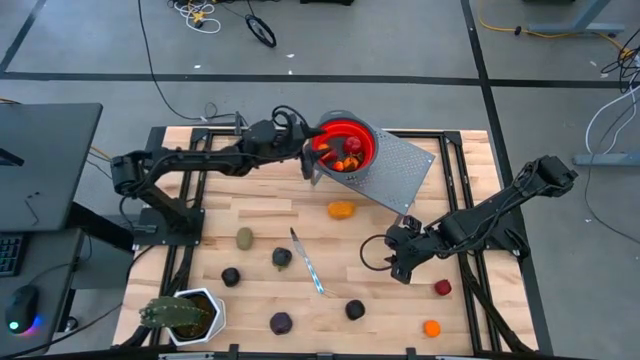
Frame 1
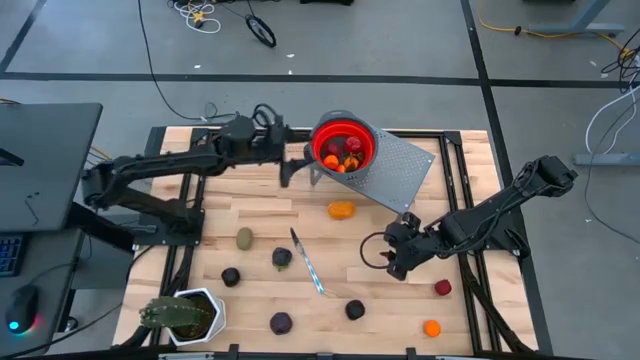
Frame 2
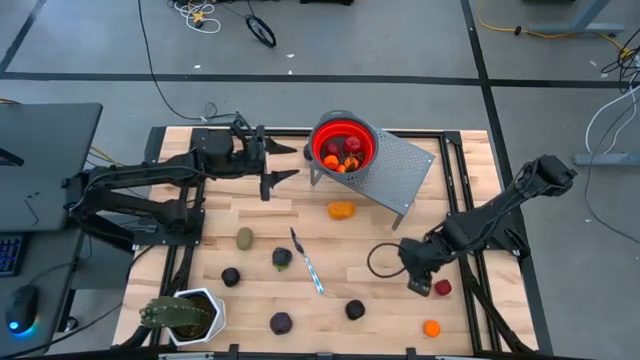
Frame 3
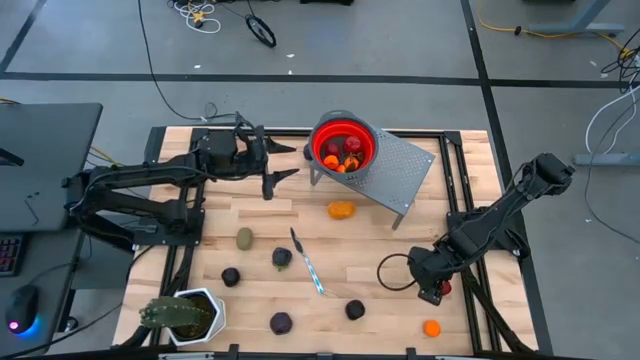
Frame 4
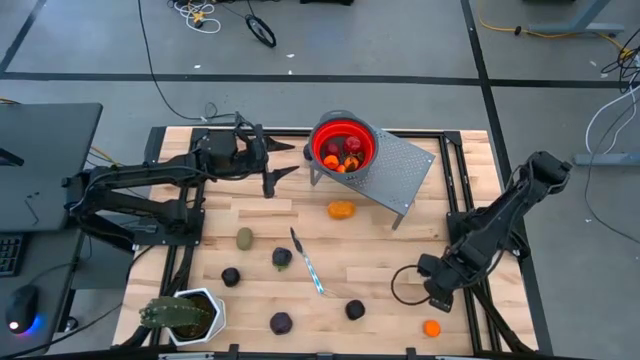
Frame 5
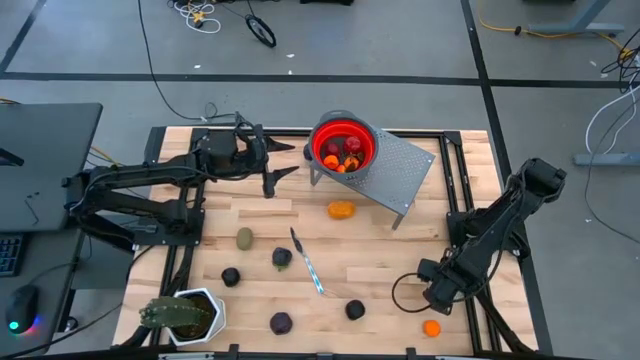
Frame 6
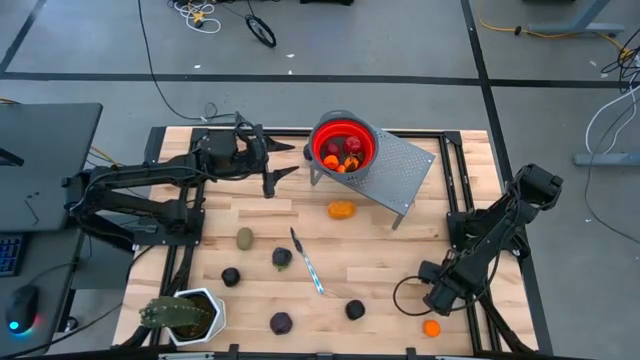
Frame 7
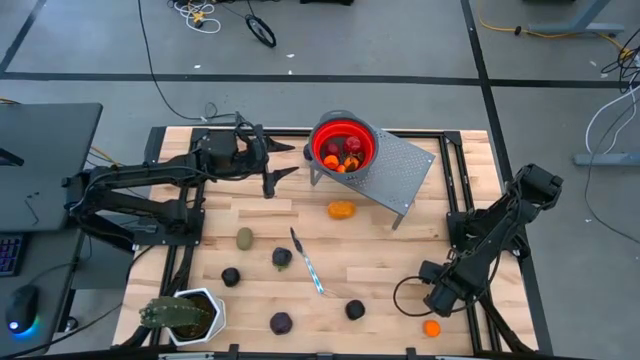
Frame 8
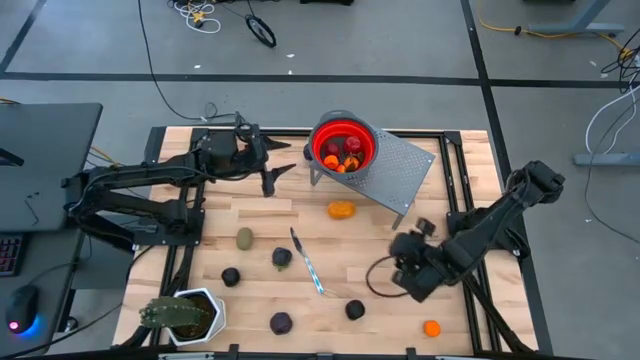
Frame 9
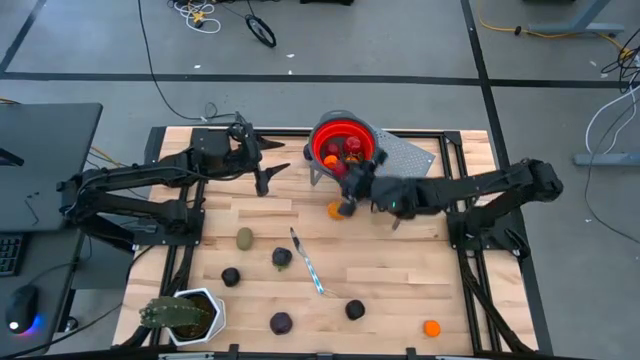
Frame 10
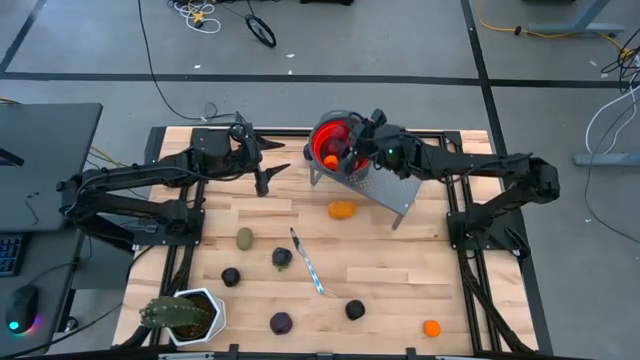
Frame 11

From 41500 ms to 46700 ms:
Task: Pick & Place Fruit
Put the pomegranate into the red strainer bowl

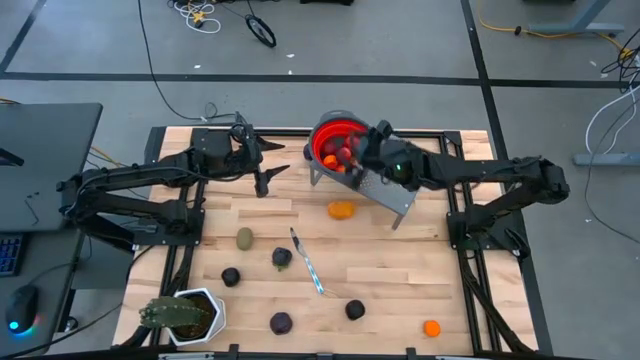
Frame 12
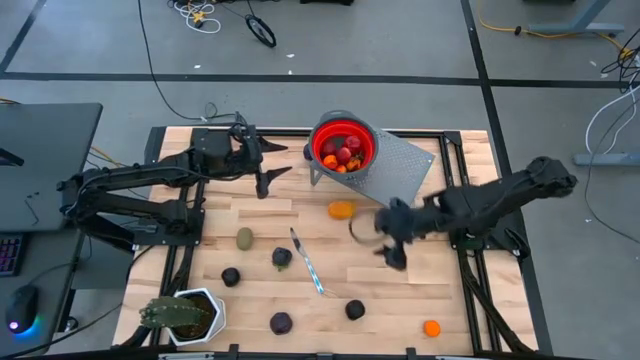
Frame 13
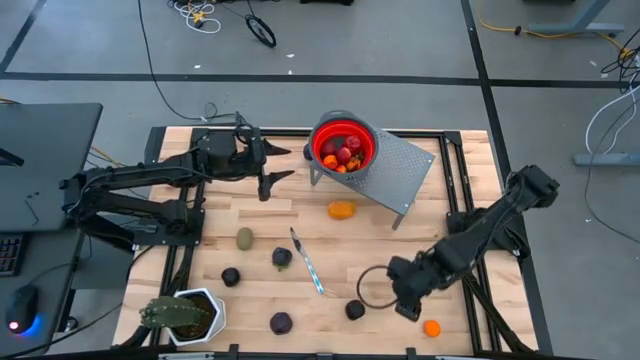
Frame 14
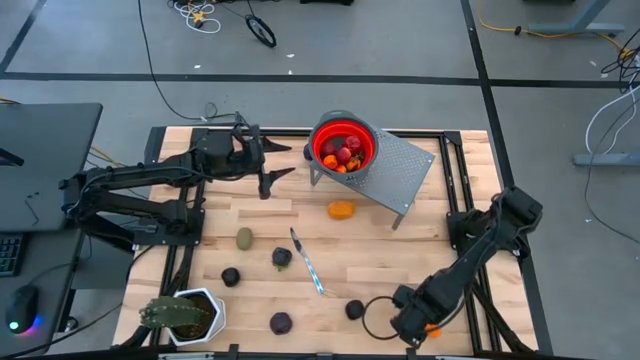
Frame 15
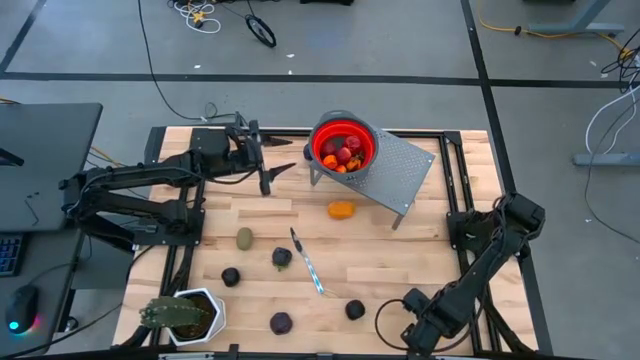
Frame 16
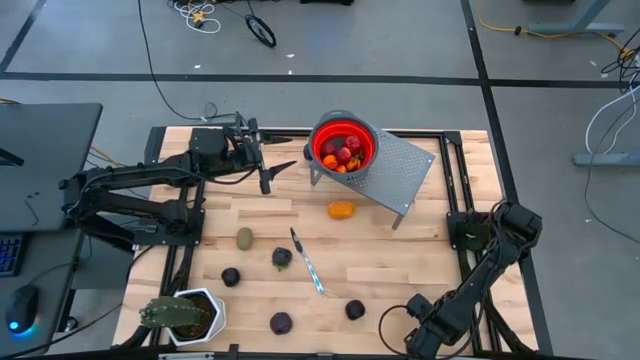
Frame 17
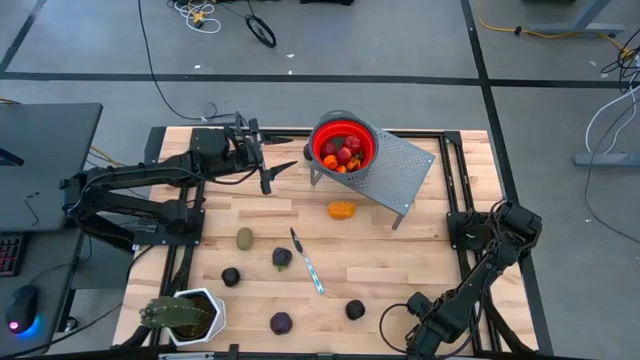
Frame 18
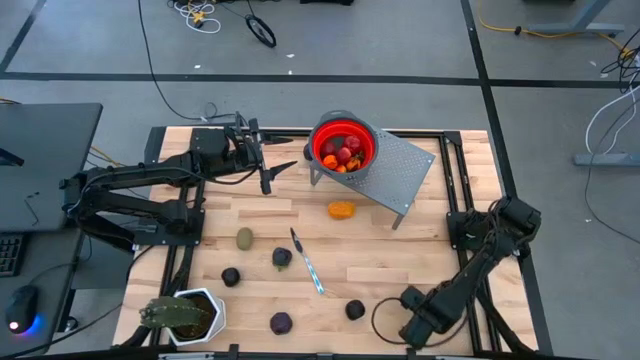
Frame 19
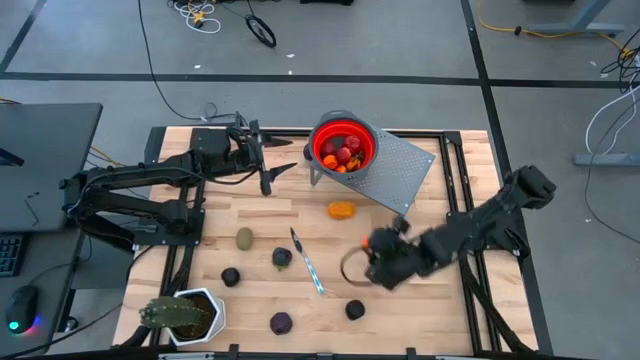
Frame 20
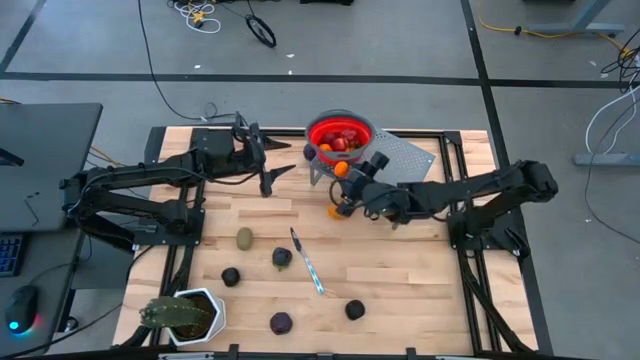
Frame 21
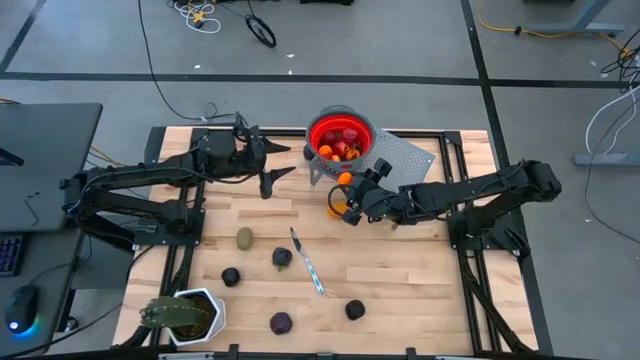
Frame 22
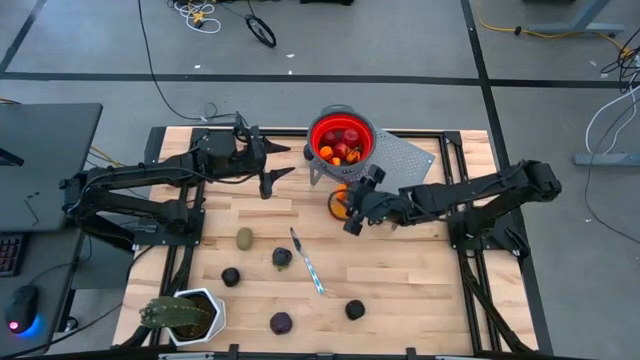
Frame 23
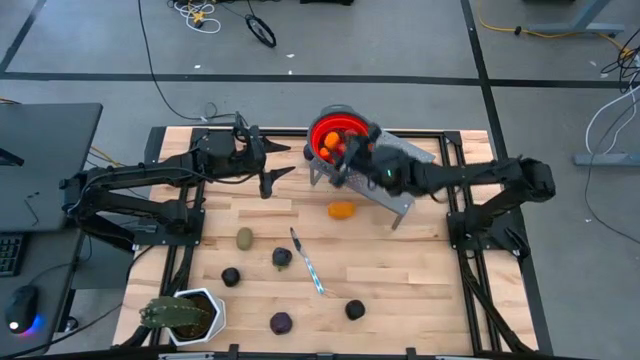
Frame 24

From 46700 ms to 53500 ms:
Put the orange into the red strainer bowl

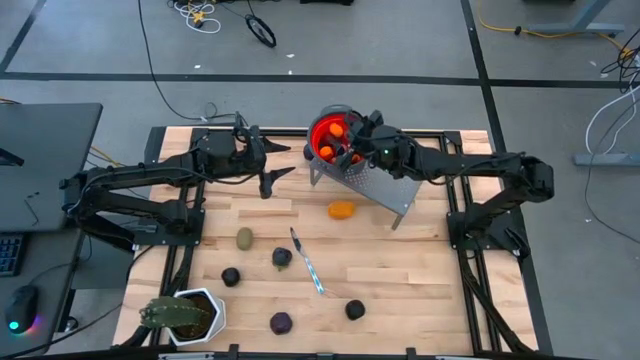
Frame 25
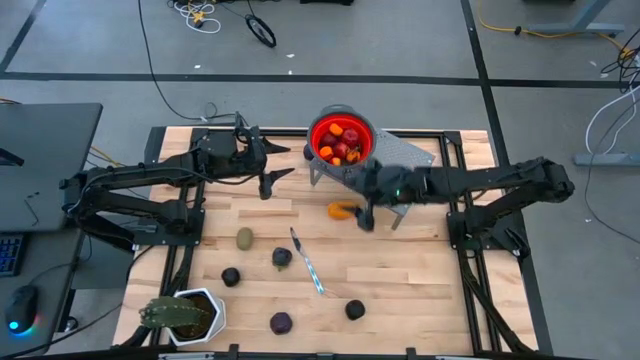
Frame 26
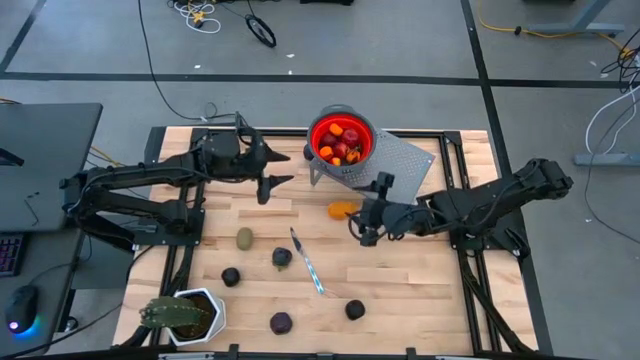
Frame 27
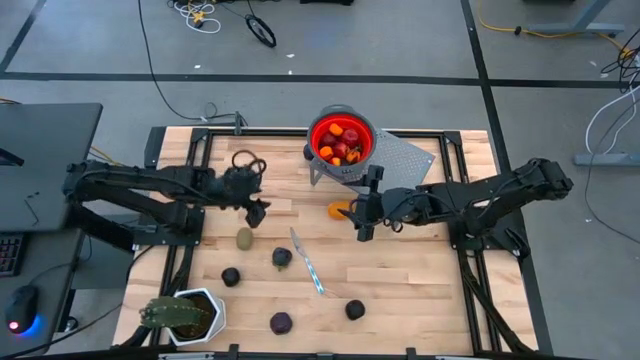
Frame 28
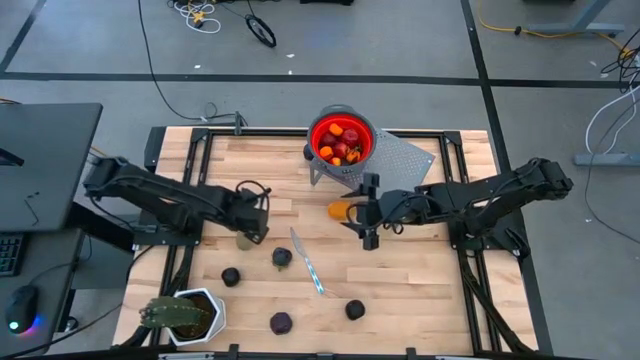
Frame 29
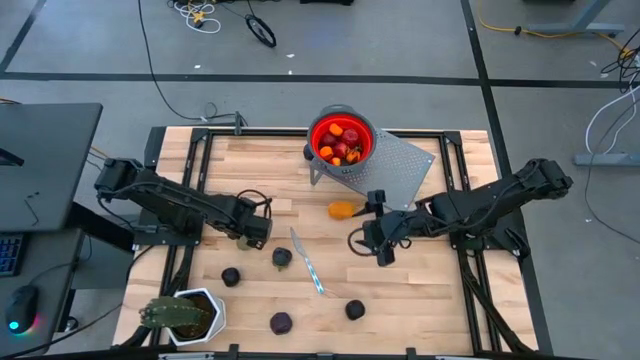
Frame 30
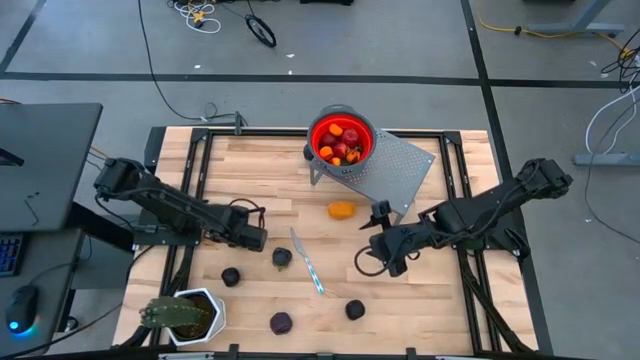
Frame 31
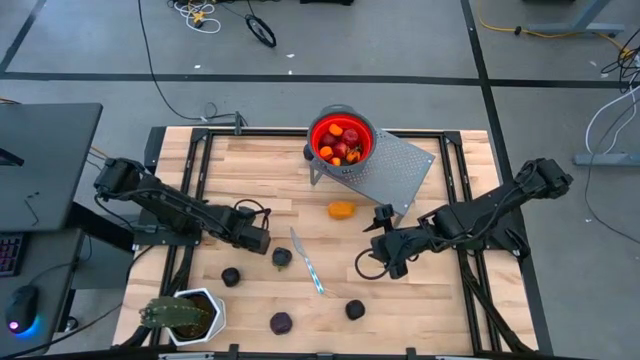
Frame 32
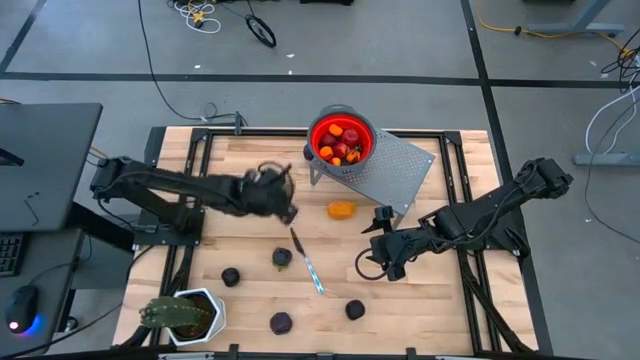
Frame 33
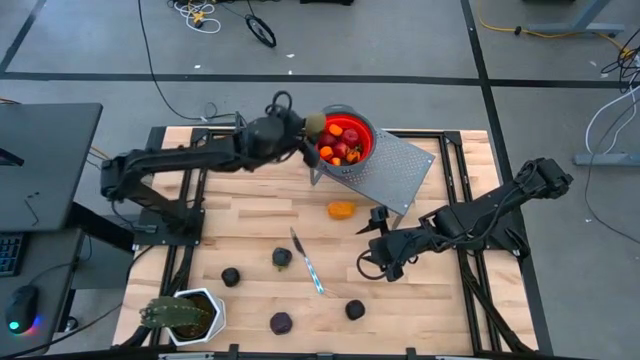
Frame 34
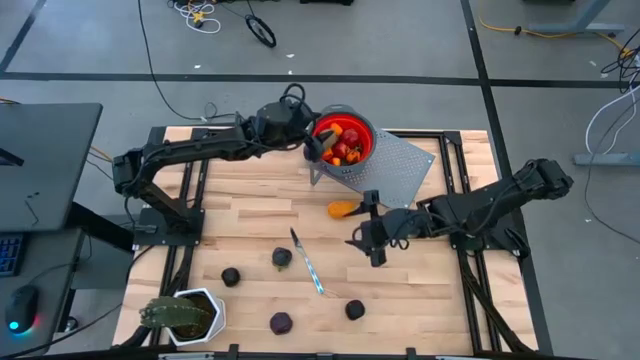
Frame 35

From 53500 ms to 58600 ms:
Put the kiwi into the red strainer bowl

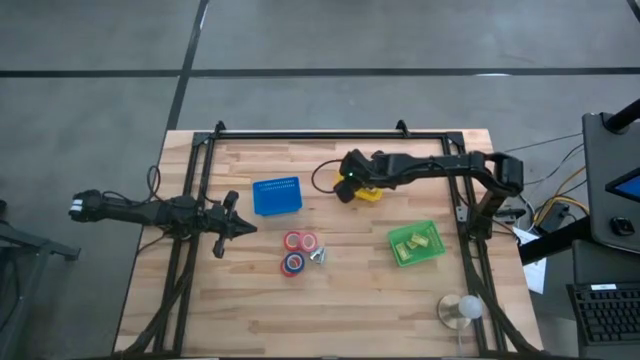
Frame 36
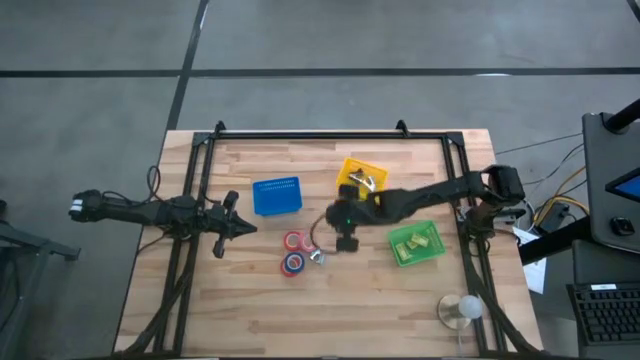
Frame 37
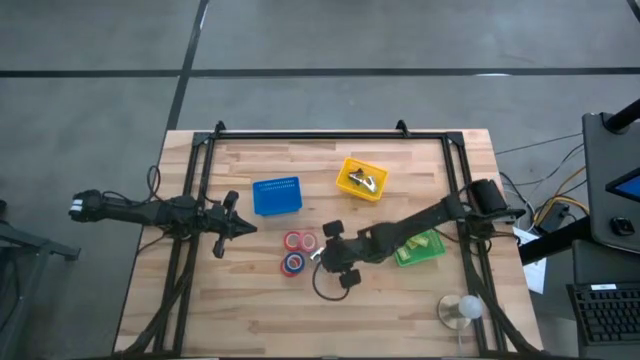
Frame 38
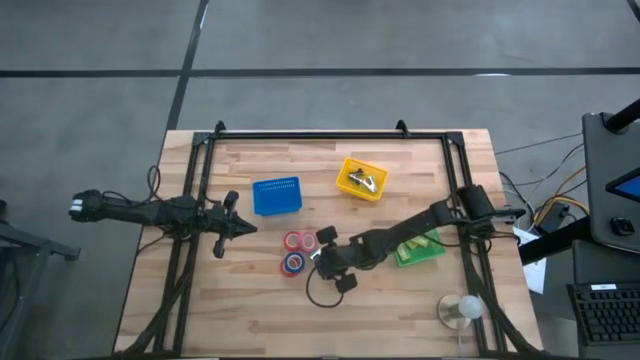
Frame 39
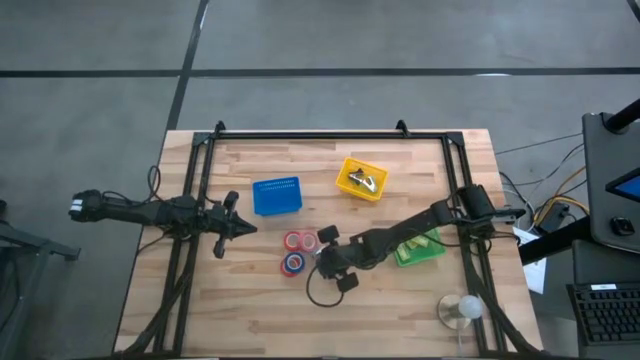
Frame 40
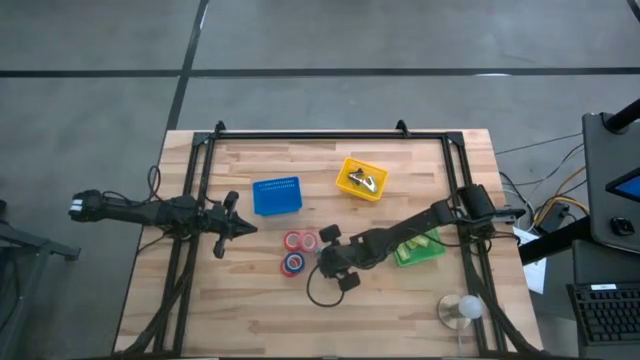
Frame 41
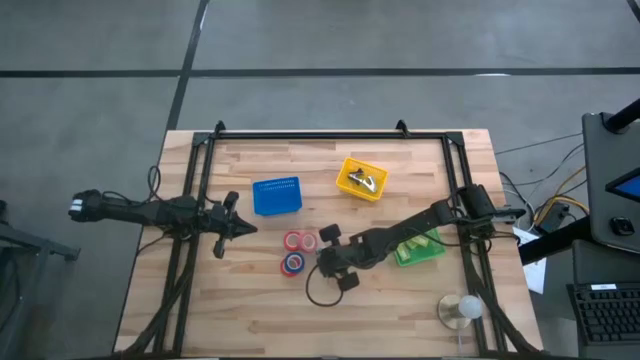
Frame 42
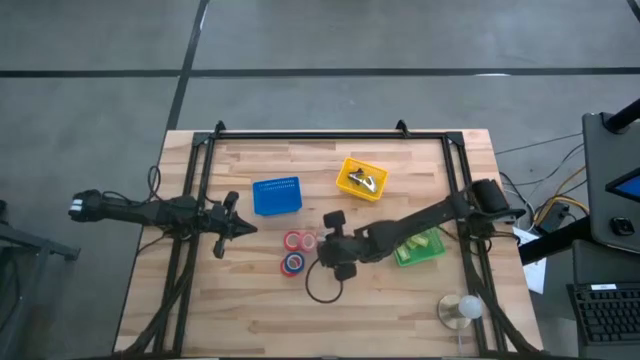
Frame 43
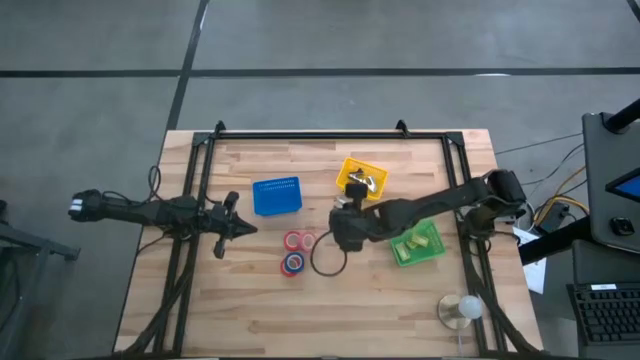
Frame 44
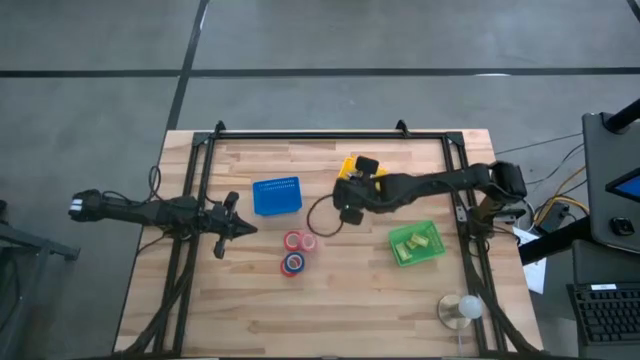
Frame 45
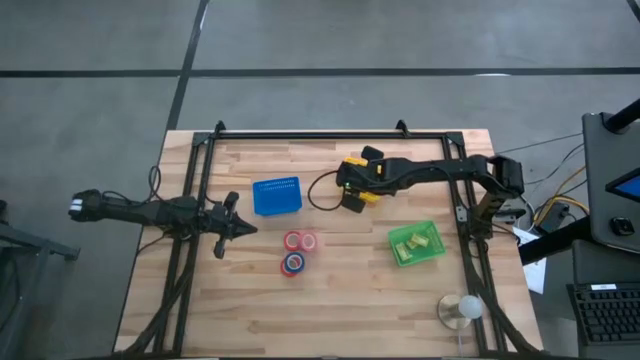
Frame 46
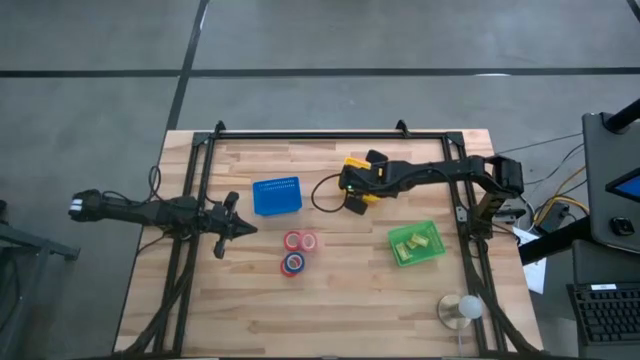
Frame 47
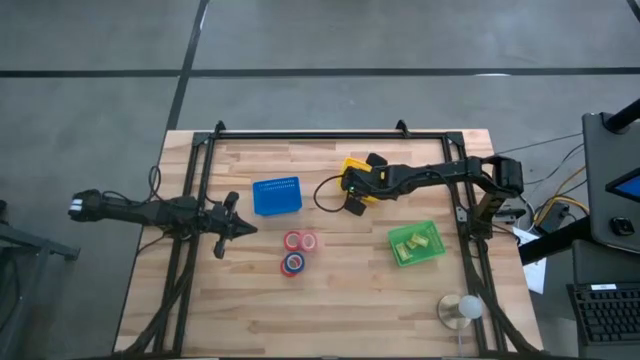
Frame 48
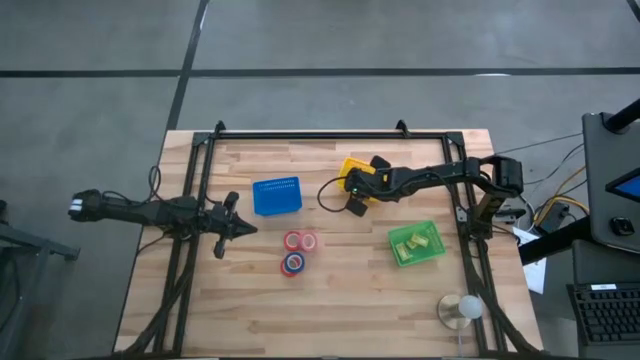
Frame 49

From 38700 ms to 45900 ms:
Task: Pick and place Stapler, Stapler remover, tape
Put the blue staple remover into the yellow bin
